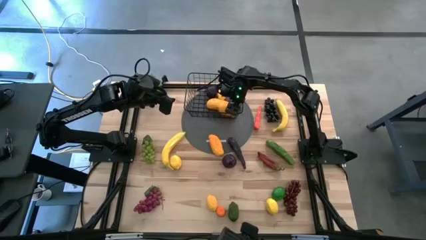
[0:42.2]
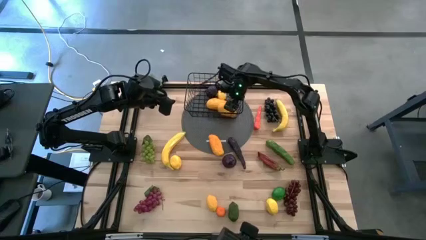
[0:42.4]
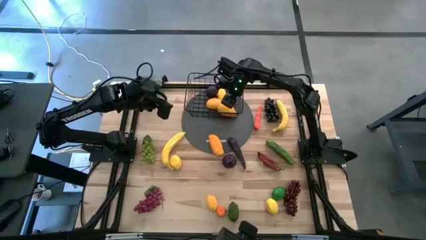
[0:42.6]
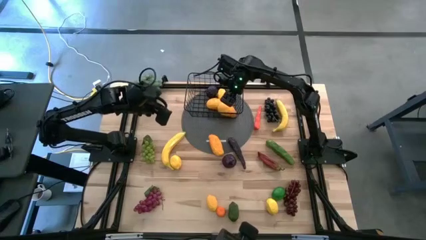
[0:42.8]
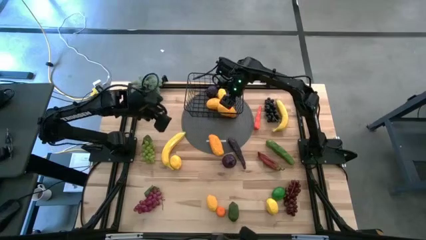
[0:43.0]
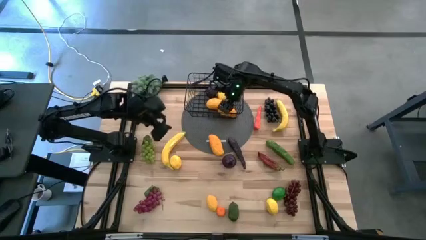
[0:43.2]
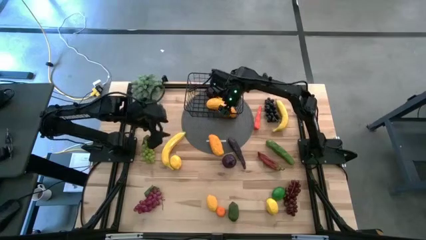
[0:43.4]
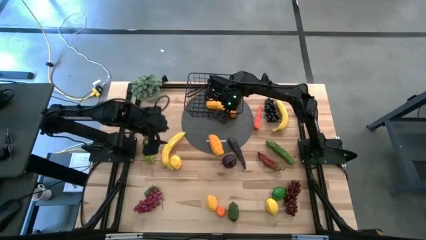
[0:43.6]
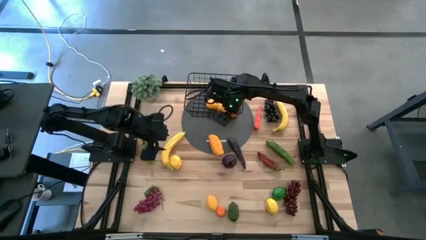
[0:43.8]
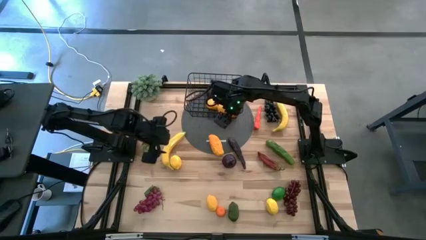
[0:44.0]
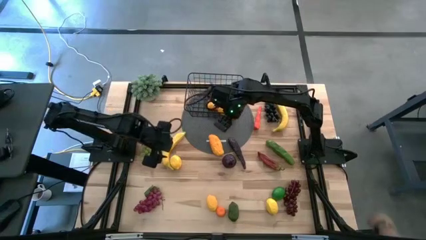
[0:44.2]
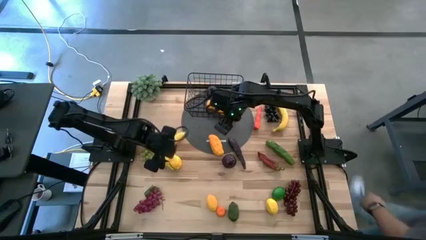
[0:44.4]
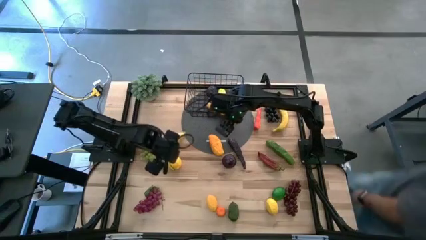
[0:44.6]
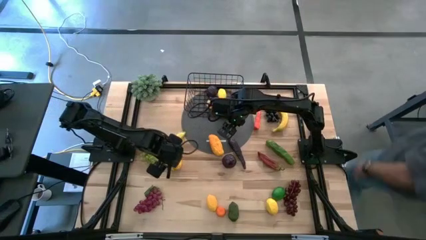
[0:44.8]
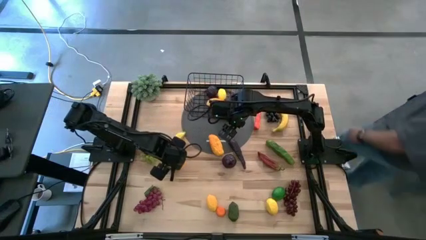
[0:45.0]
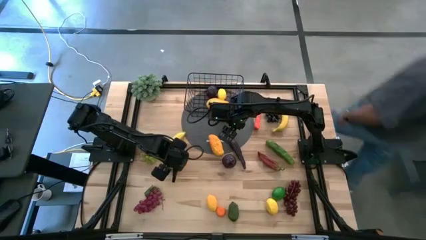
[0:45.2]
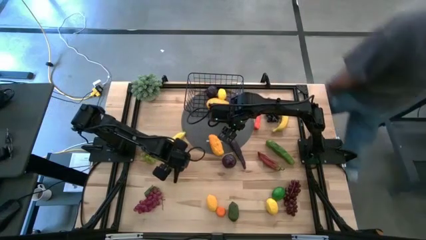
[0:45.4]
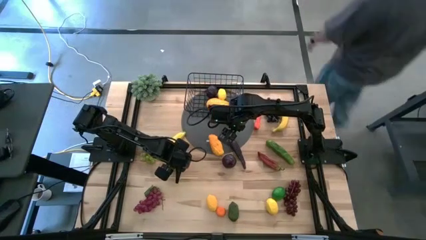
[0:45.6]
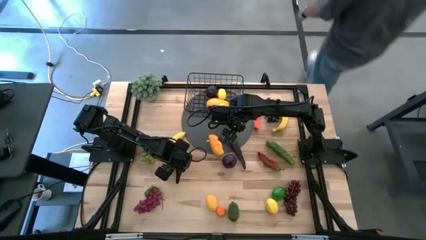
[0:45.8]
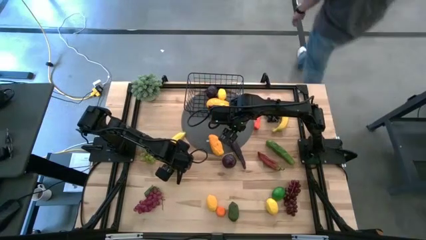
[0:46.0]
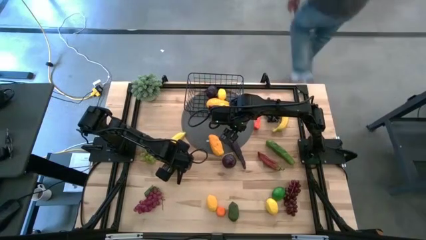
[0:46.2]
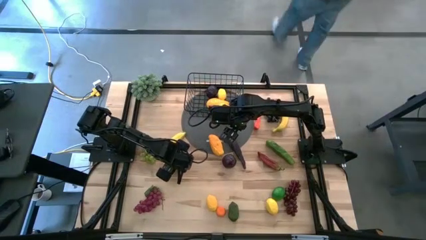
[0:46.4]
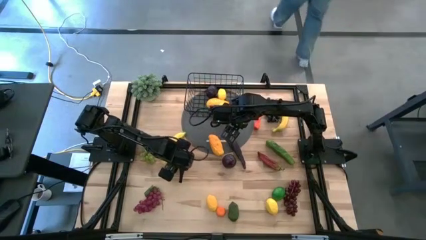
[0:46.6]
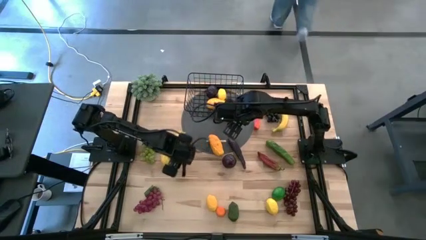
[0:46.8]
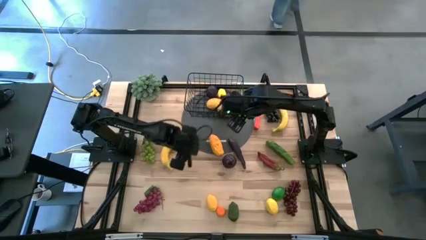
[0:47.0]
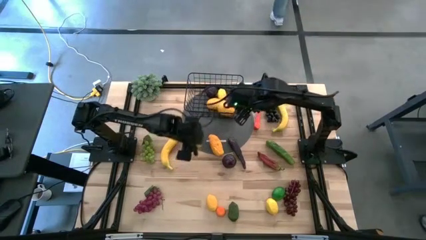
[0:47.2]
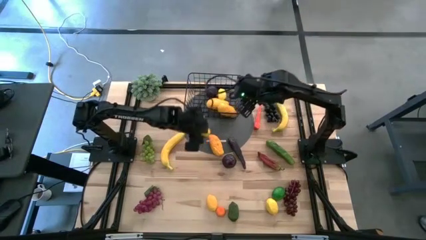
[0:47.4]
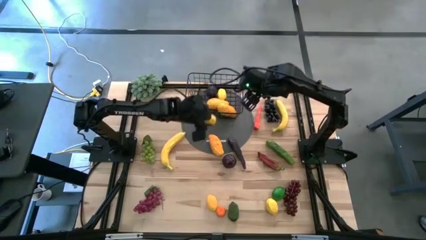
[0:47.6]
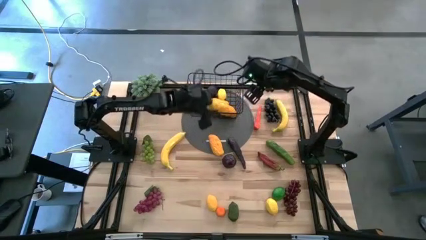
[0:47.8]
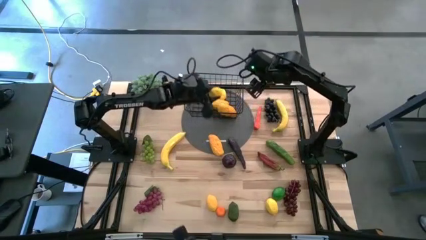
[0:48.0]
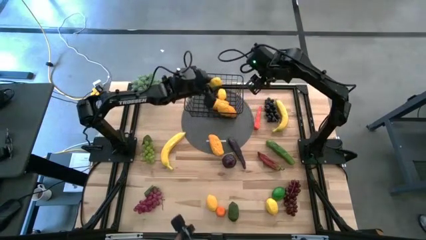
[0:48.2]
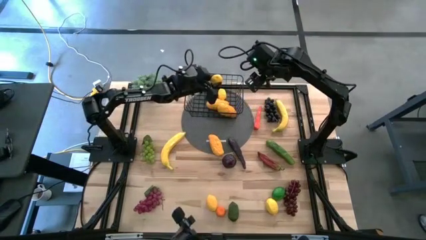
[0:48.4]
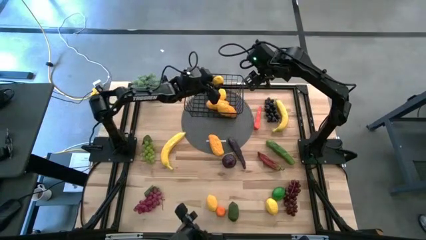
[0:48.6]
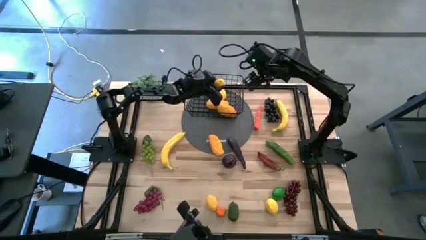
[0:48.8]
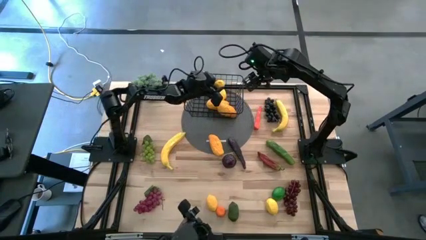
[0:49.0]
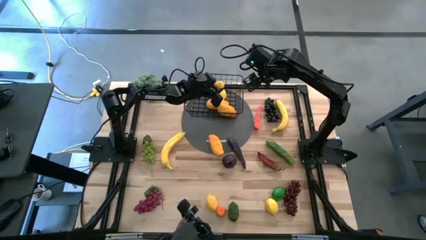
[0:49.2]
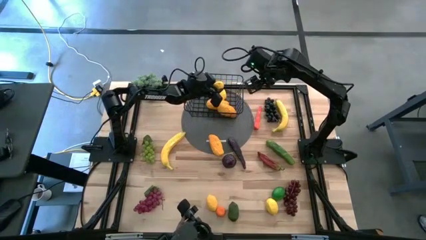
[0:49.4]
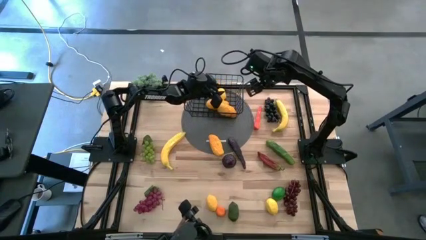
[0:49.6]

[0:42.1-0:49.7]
Task: Build produce basket
Put the lemon into the black wire basket

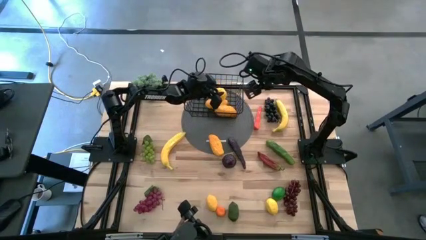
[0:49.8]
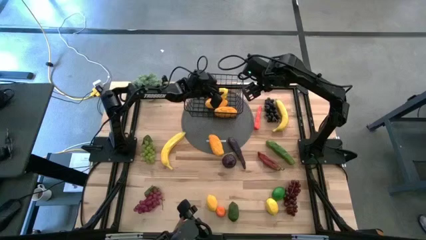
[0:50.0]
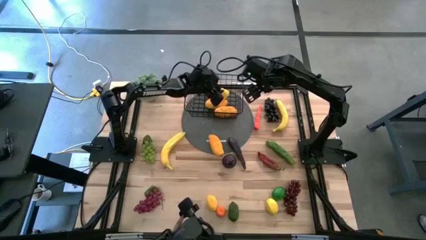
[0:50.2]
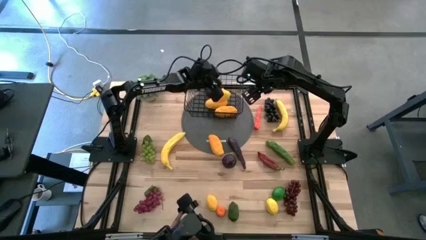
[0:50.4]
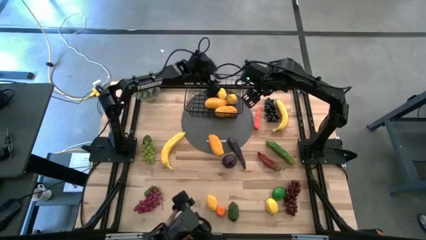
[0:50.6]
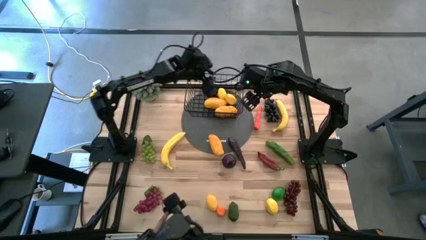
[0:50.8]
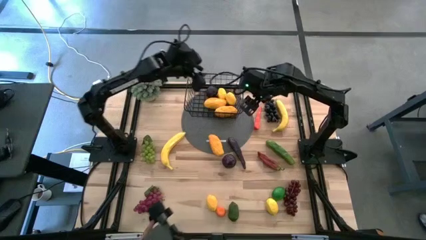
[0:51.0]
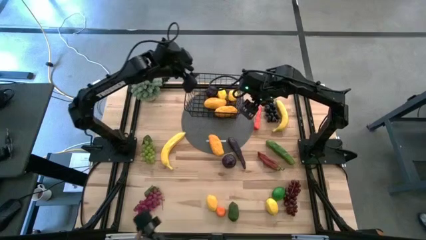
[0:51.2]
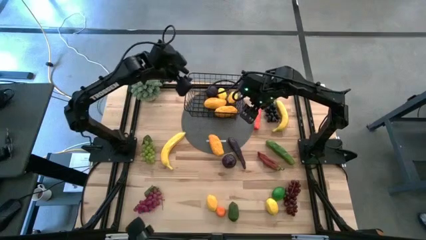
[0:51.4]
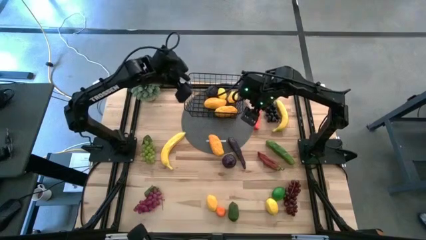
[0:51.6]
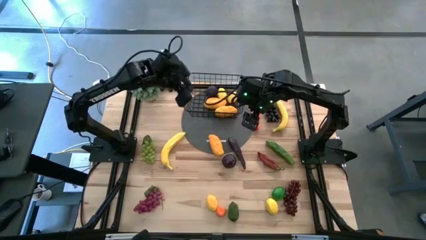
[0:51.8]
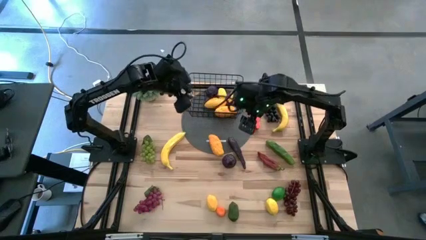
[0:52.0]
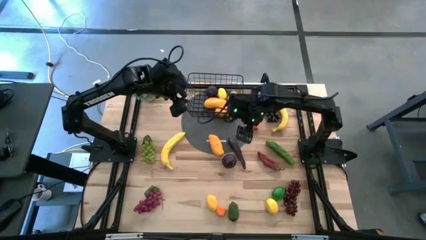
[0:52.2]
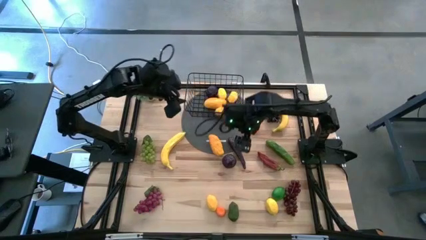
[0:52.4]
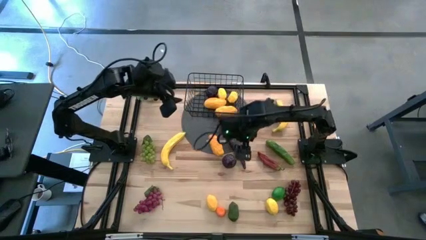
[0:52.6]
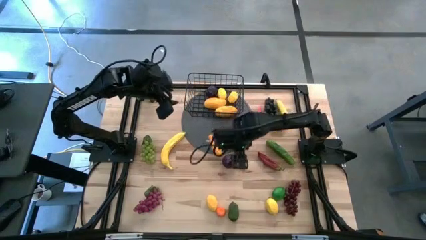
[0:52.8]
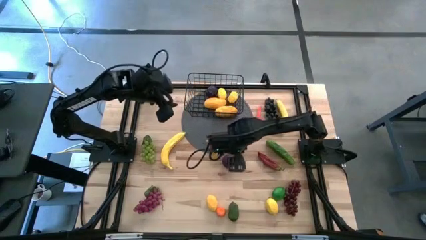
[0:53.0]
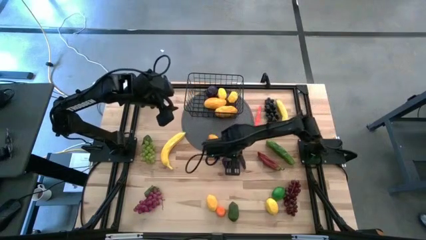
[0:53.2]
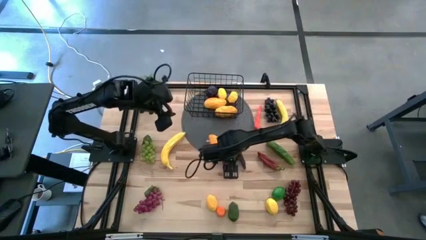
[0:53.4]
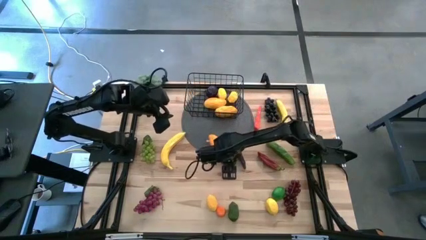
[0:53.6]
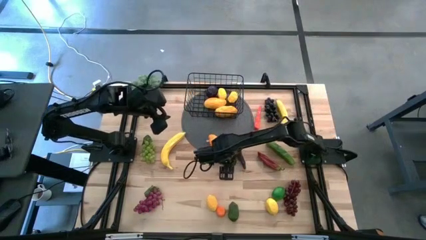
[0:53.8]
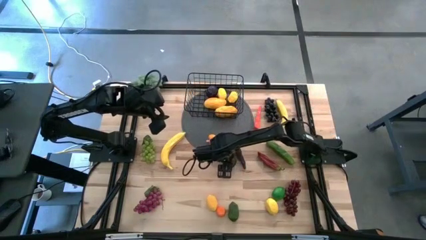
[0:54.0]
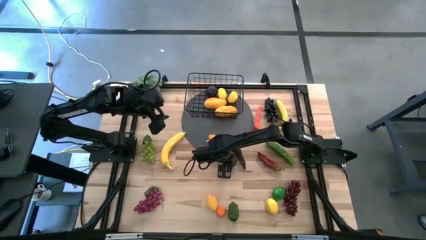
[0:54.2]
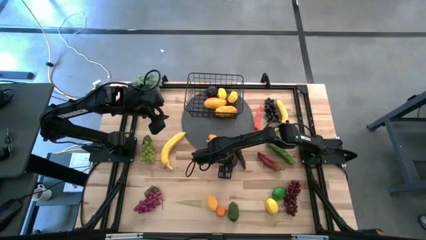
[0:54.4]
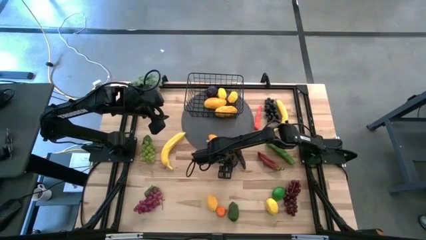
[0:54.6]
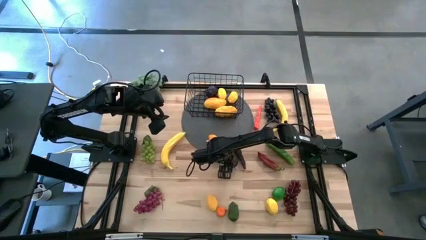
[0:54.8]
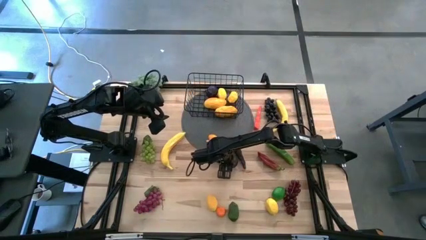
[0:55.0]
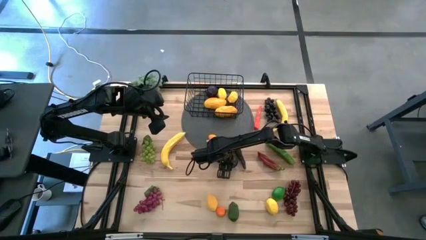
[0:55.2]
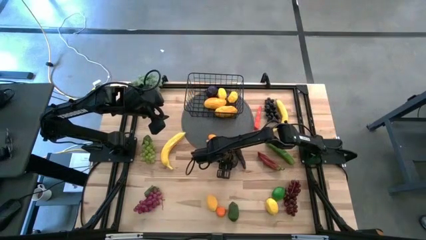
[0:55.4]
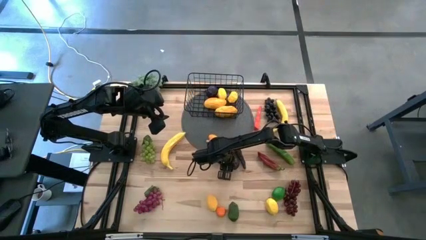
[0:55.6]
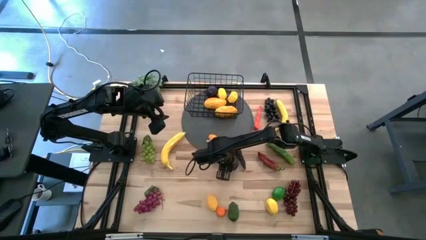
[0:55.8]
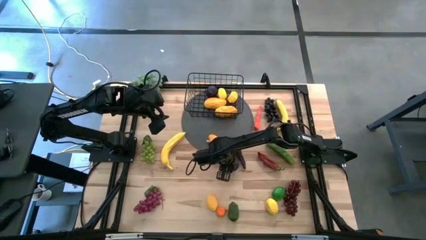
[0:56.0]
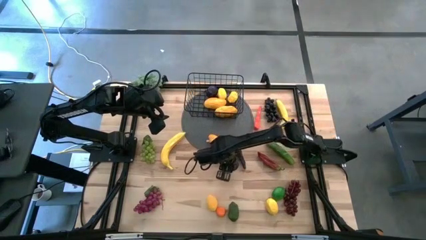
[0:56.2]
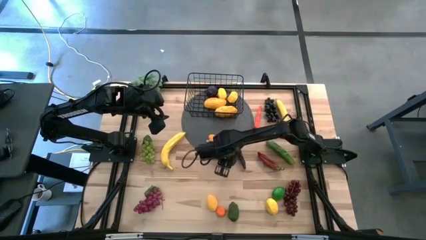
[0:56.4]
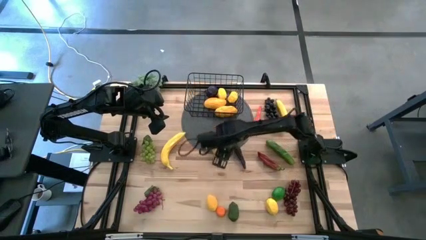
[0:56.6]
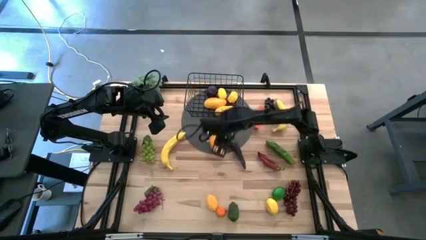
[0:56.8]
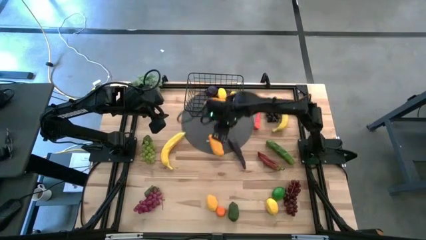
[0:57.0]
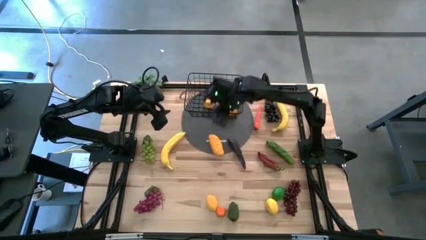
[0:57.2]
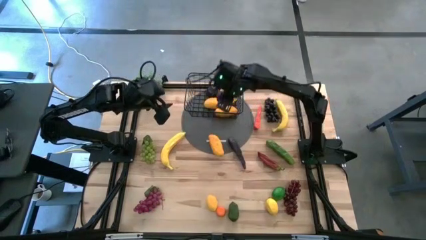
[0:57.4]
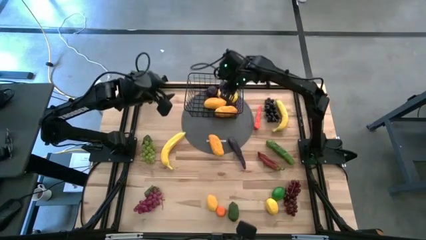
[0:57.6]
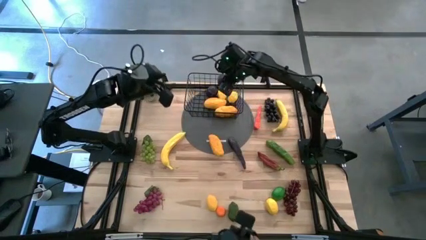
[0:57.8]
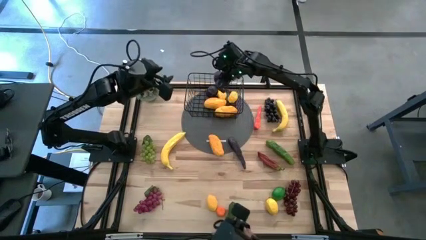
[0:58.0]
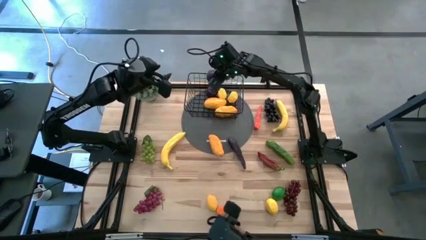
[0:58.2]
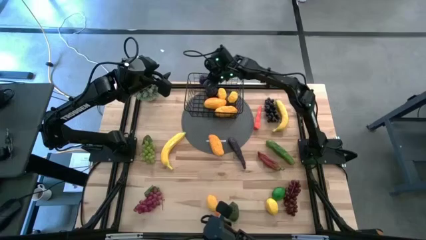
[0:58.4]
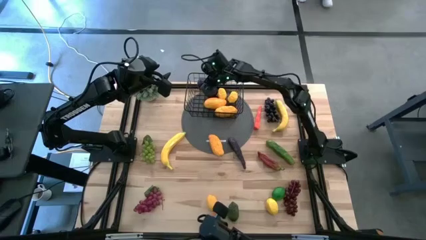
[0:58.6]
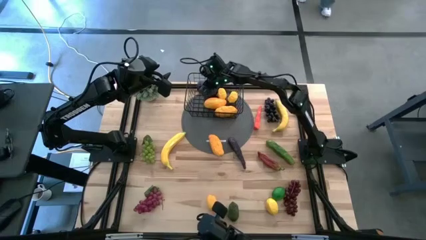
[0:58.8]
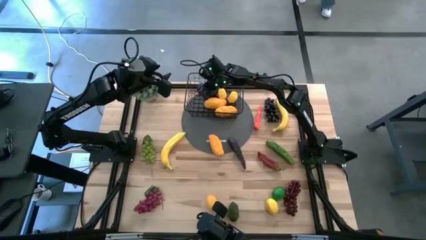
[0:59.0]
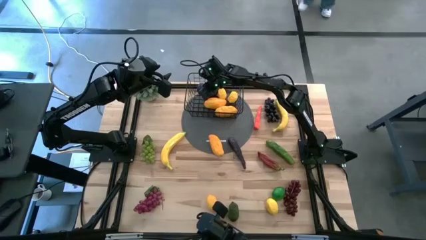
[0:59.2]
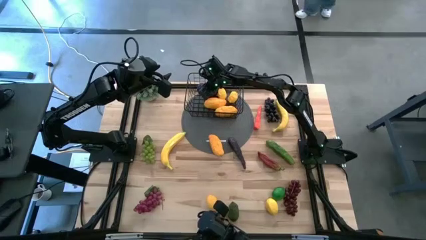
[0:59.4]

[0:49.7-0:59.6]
Put the plum into the black wire basket
